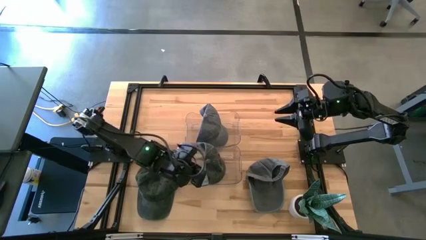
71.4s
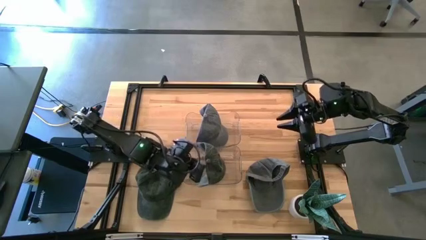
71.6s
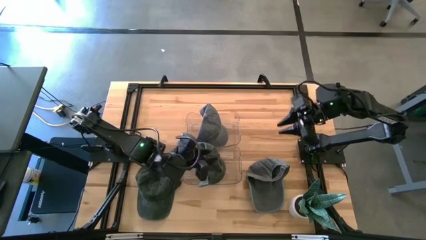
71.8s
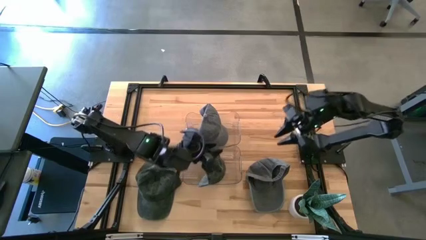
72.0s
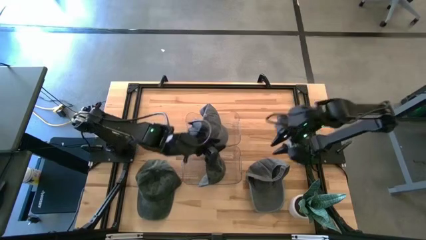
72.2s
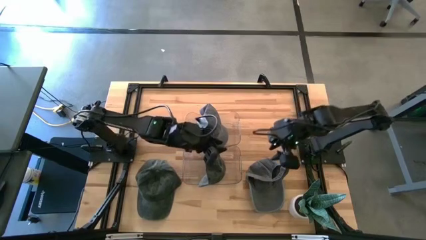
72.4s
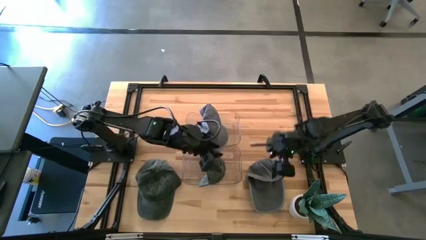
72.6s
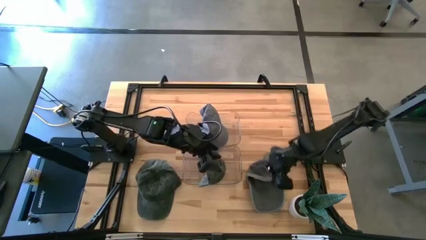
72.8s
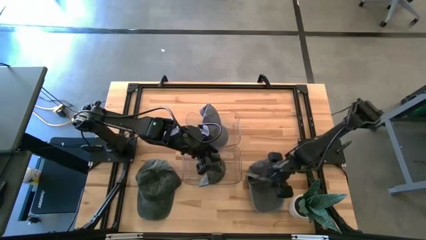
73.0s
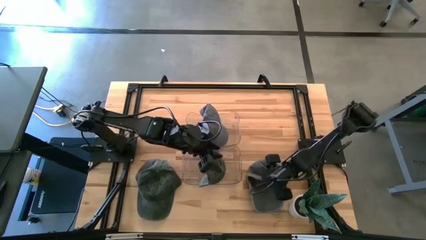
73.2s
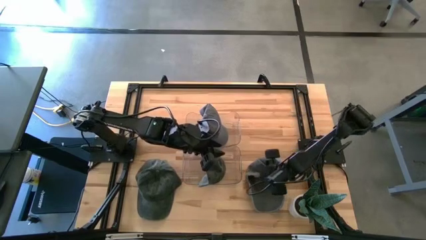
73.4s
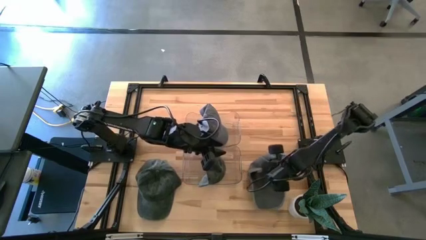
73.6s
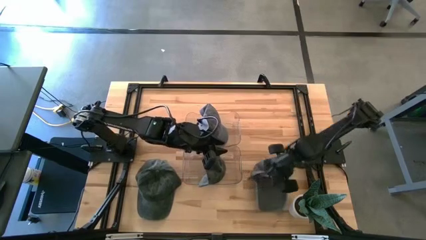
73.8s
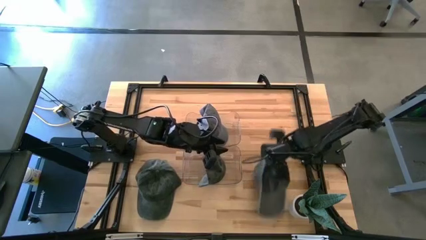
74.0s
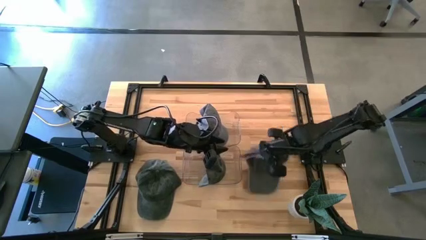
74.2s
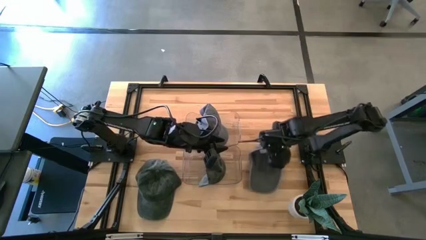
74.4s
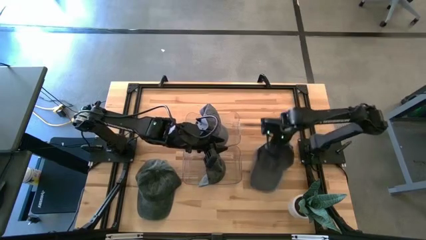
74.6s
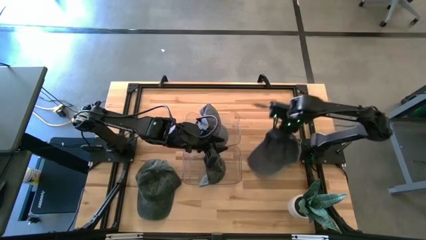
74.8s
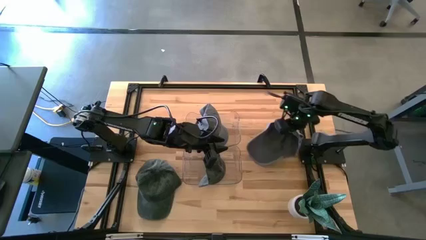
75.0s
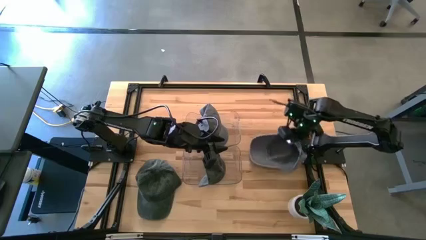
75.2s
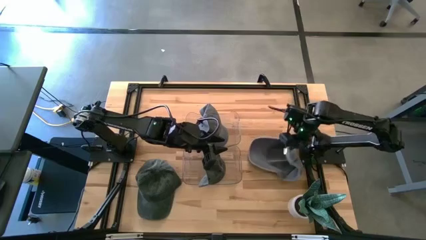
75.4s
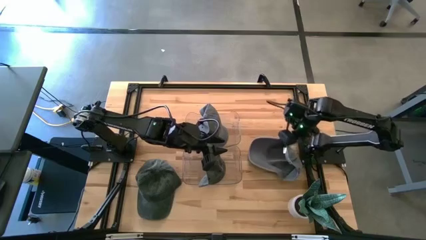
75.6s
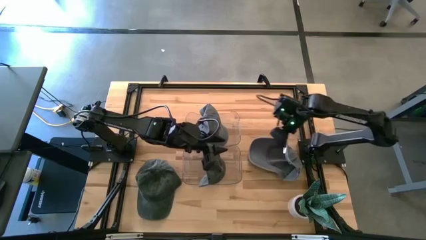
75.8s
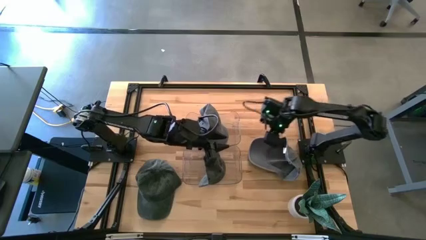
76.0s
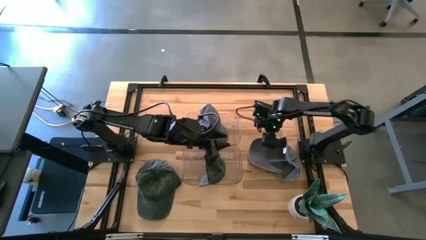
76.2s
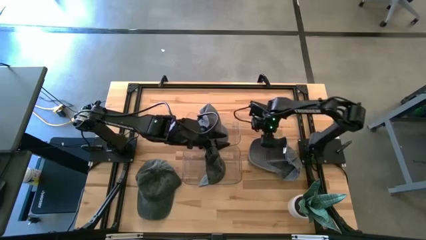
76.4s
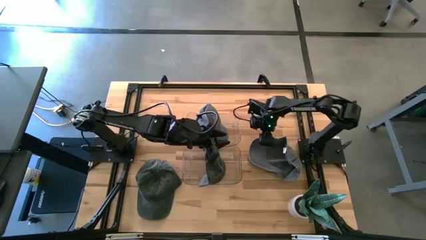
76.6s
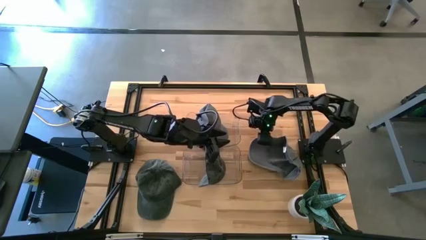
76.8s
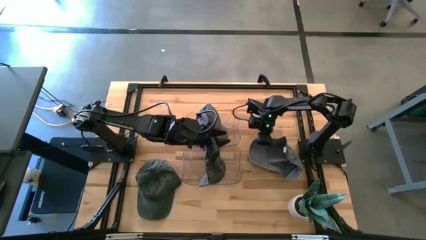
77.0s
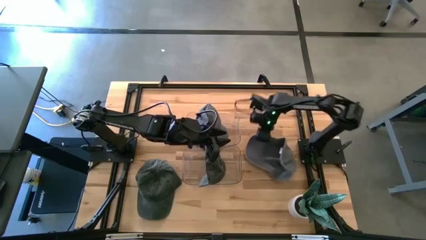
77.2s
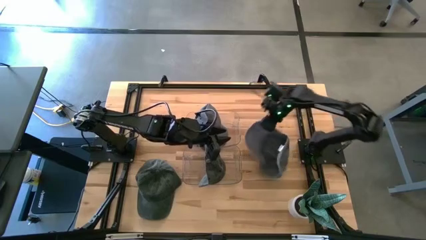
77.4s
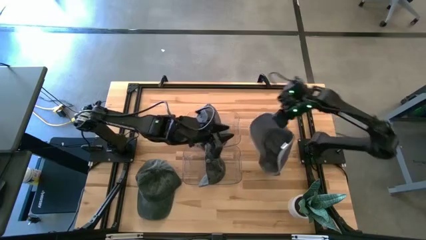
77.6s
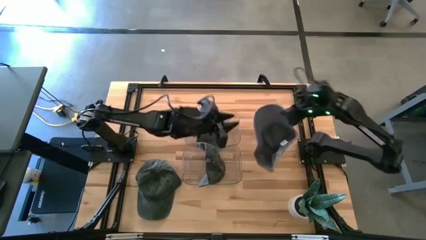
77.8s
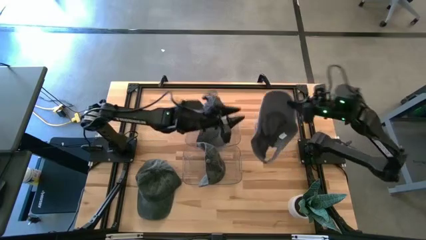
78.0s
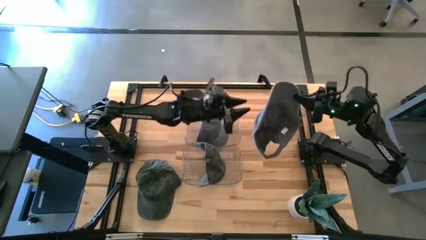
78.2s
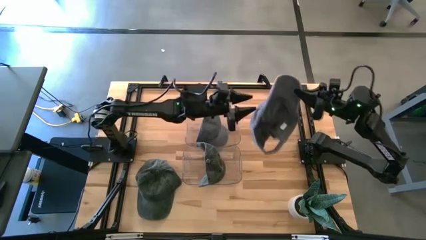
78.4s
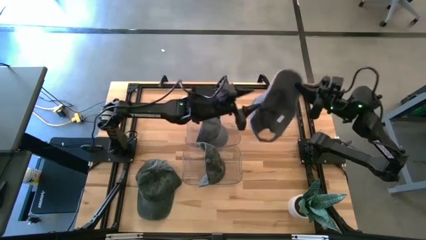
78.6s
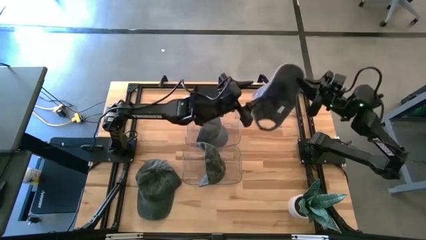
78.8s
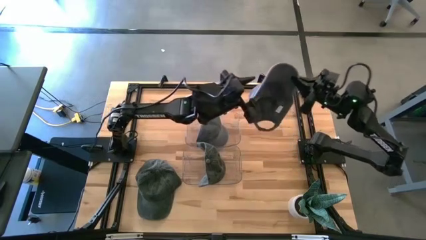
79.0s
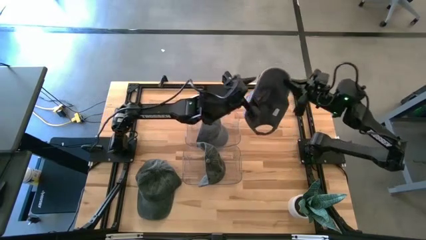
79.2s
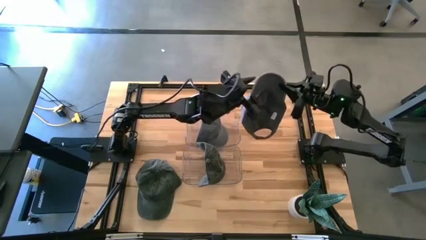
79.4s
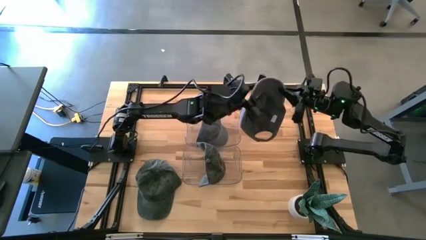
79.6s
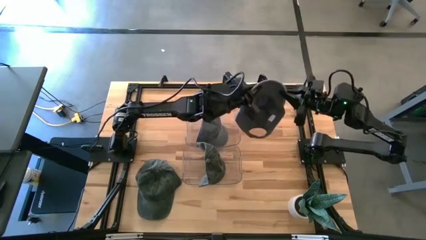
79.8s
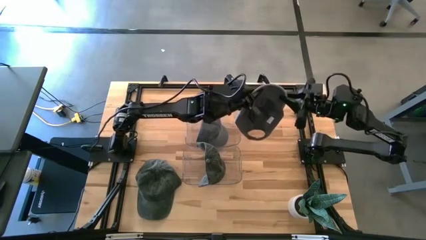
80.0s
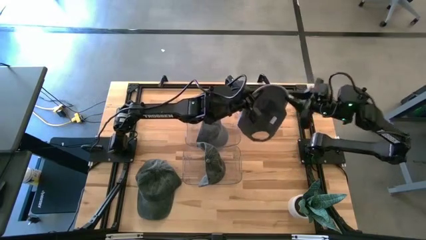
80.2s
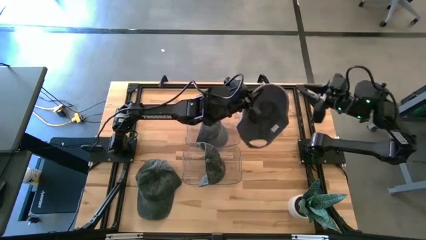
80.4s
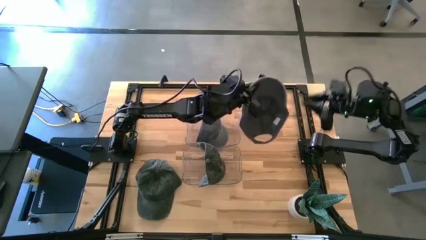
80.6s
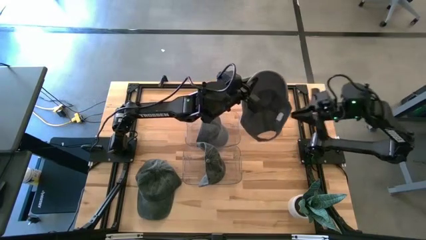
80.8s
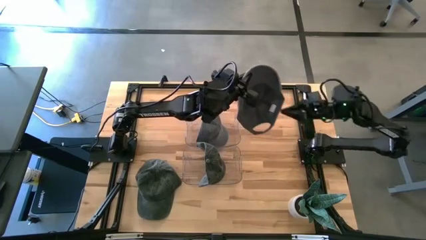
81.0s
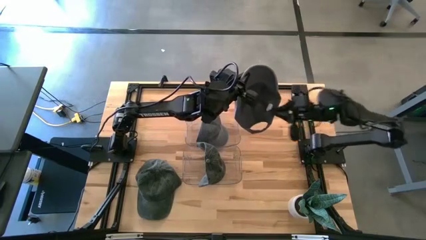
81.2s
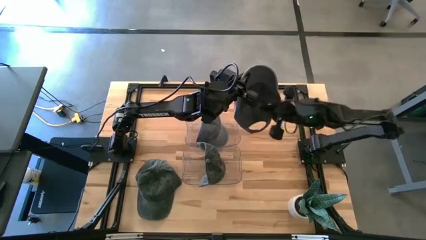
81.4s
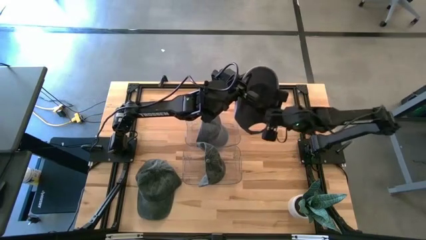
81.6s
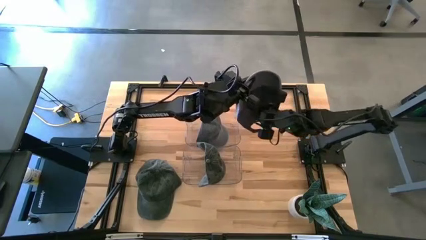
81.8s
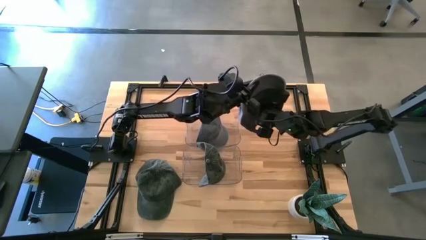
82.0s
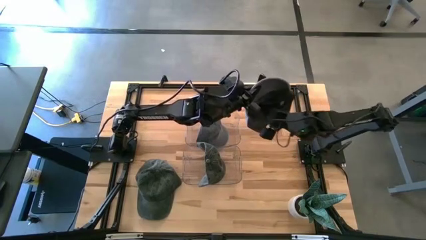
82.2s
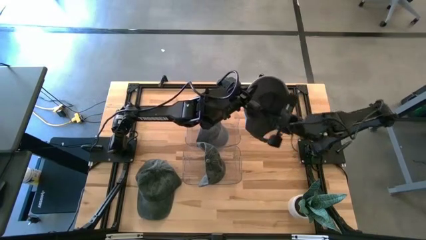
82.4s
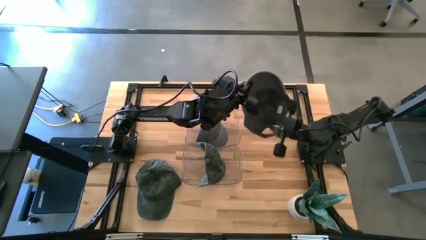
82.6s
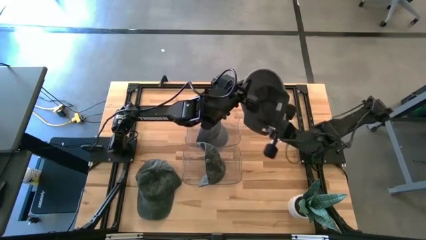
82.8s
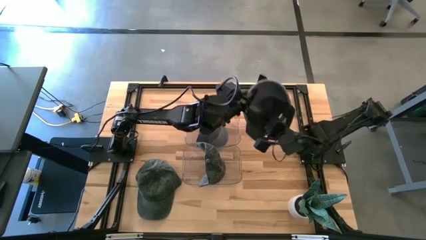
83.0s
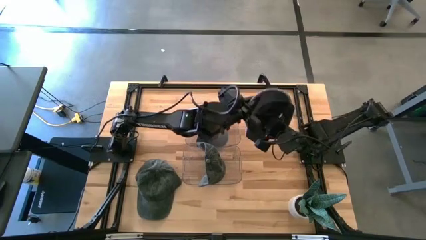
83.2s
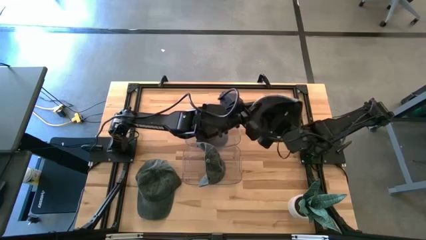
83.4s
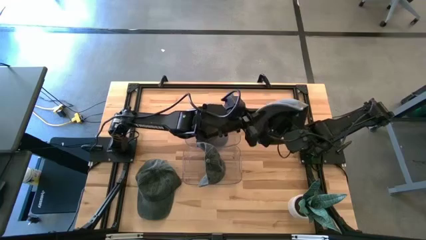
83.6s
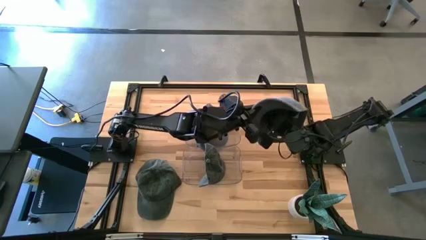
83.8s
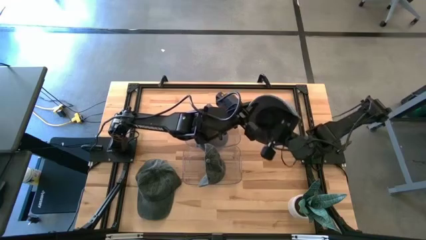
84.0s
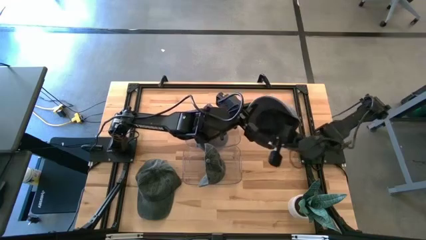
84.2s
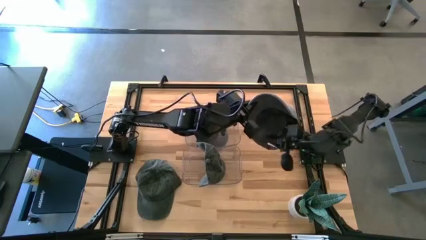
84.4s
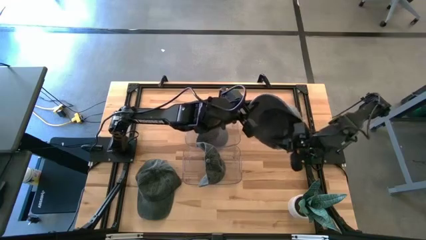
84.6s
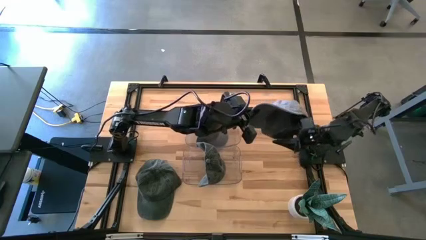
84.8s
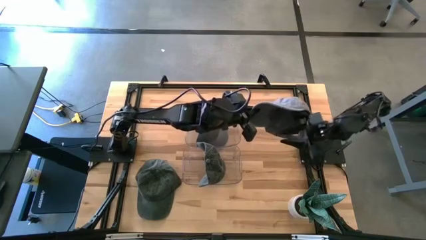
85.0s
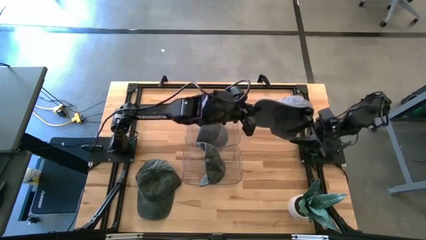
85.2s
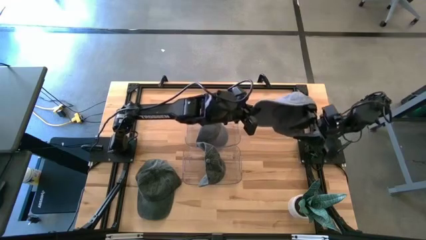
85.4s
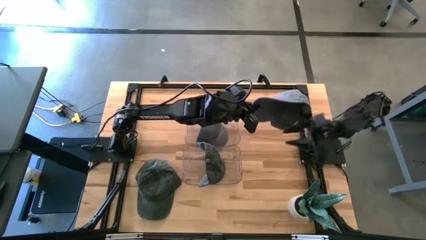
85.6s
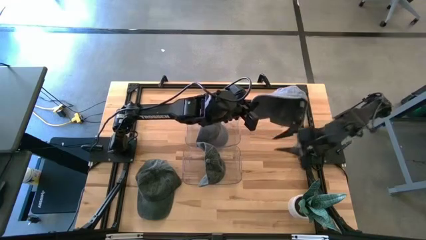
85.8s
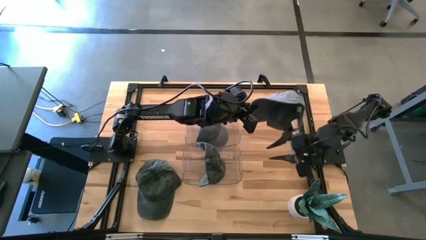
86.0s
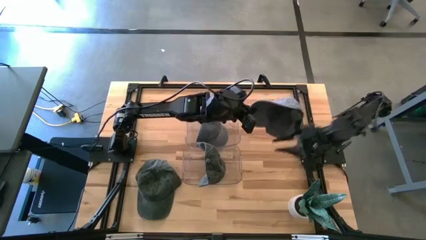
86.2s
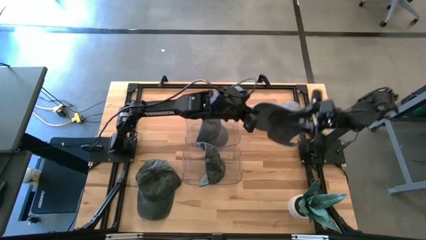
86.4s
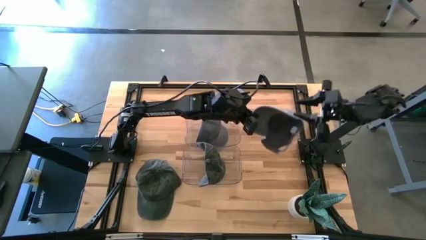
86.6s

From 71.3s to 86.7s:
Task: Pick & Place hat
Put the gray cap into the top transparent bin
